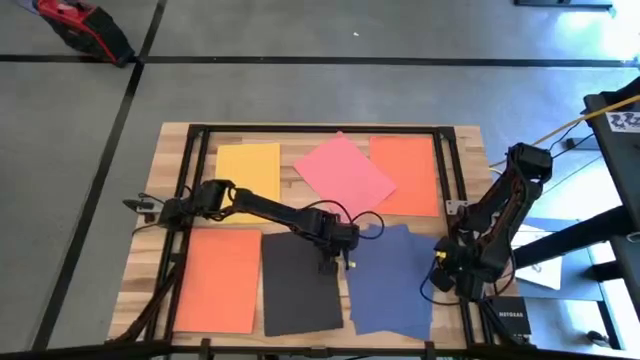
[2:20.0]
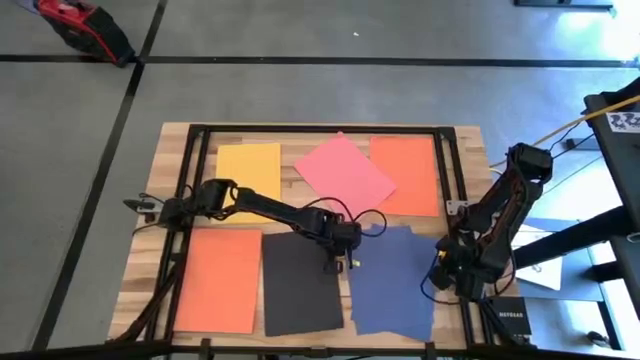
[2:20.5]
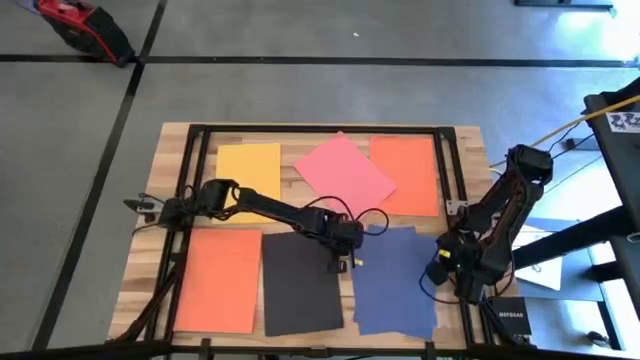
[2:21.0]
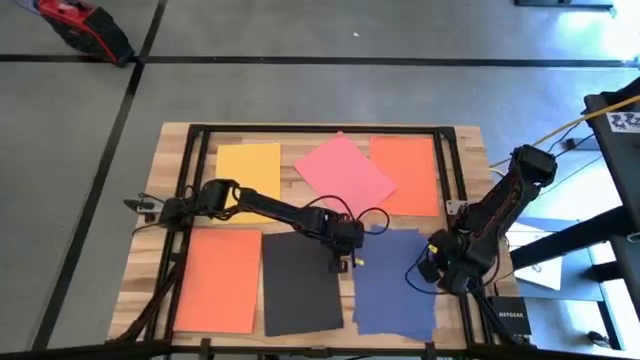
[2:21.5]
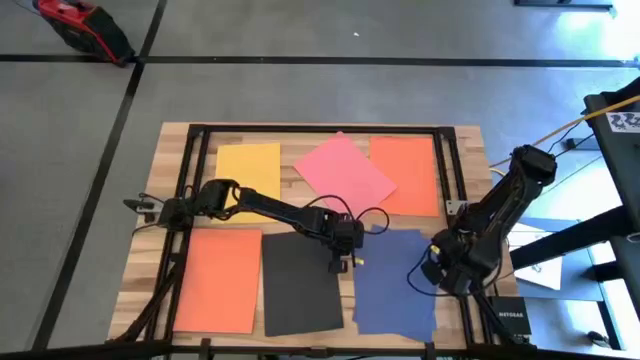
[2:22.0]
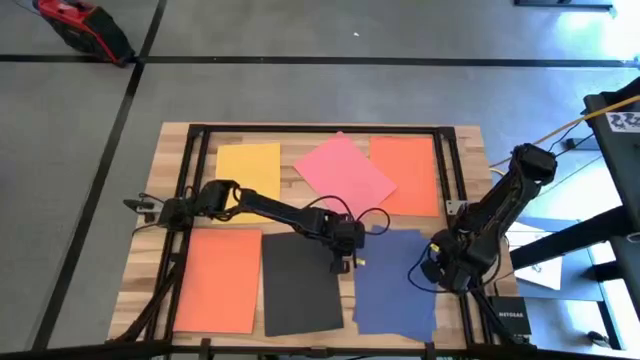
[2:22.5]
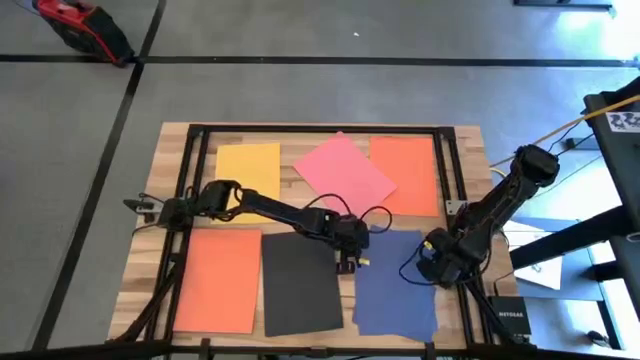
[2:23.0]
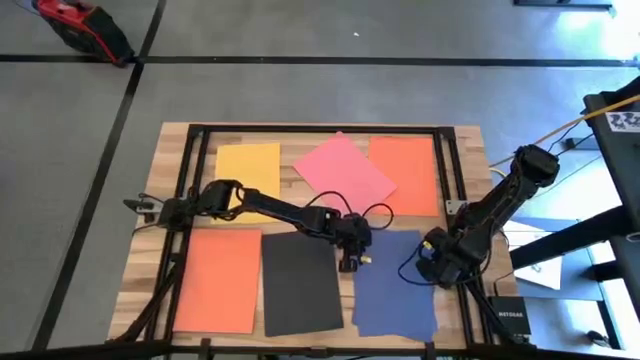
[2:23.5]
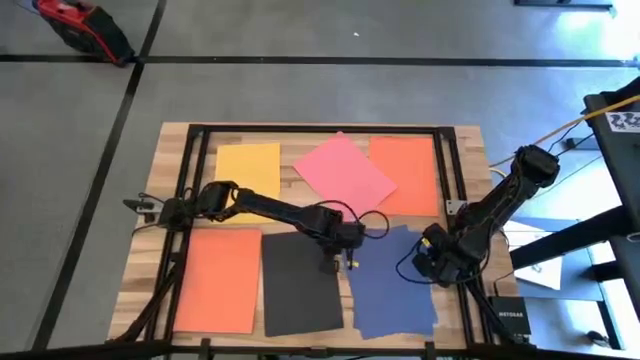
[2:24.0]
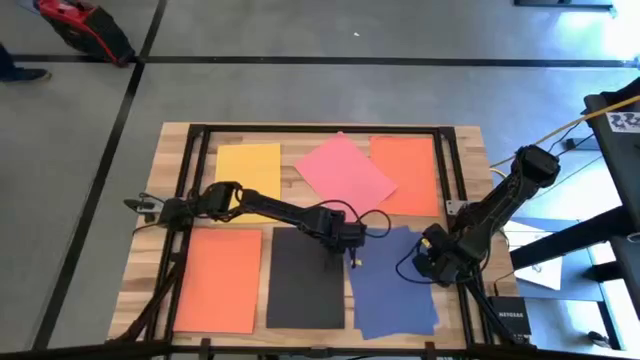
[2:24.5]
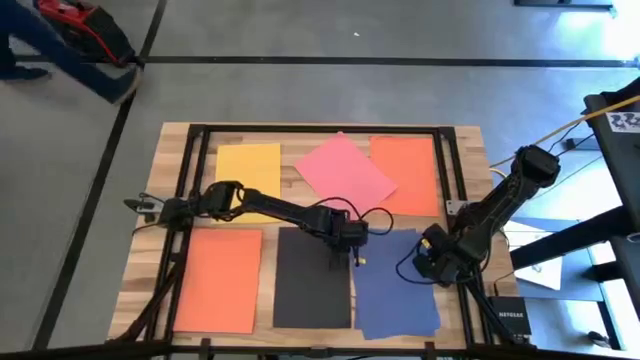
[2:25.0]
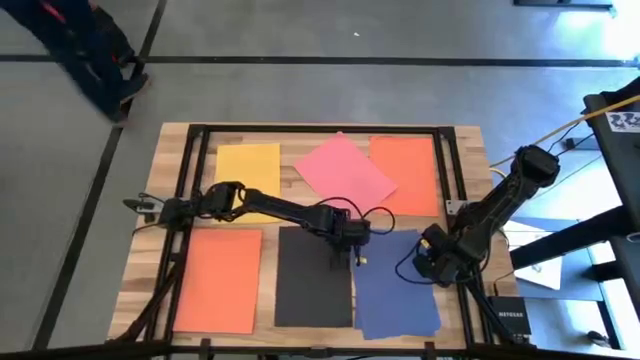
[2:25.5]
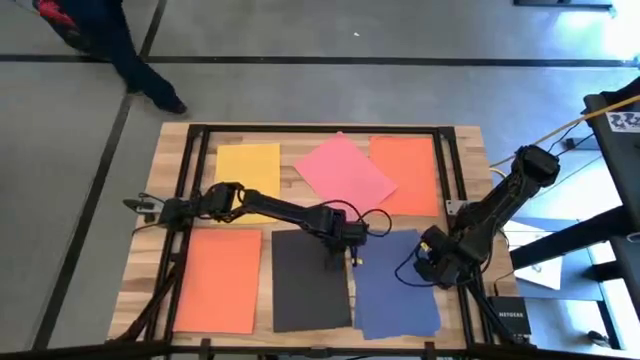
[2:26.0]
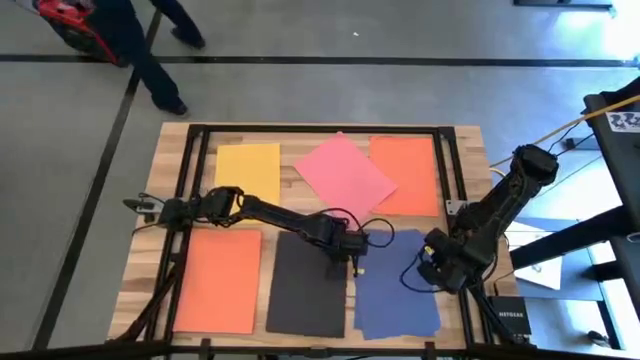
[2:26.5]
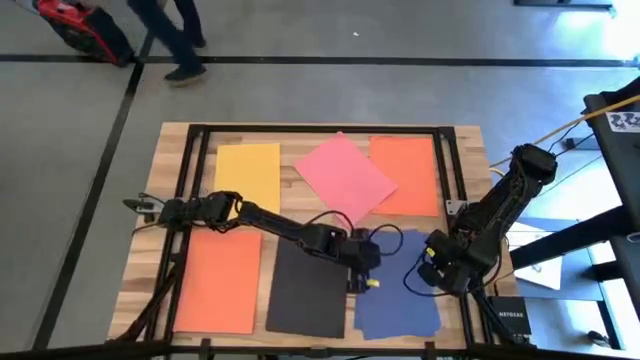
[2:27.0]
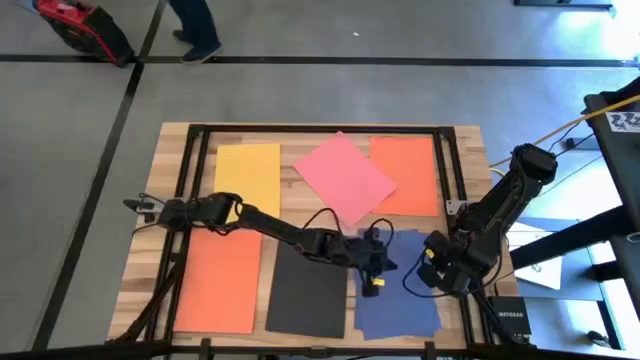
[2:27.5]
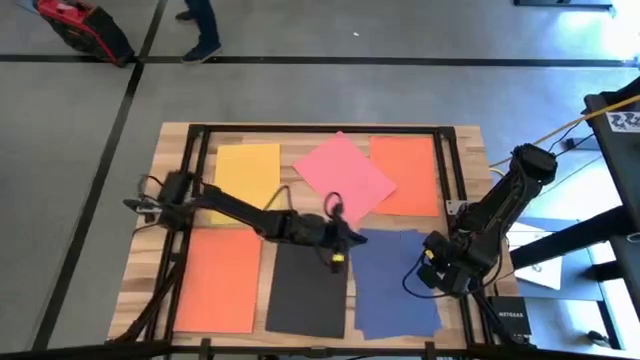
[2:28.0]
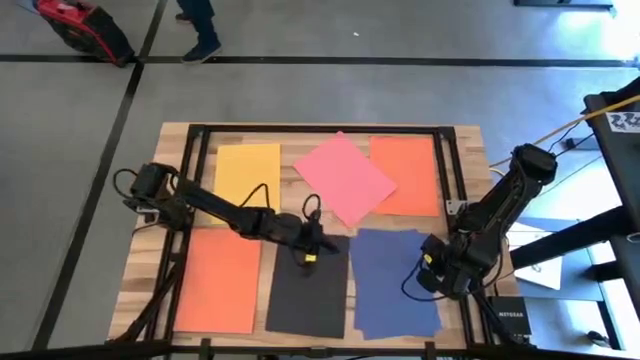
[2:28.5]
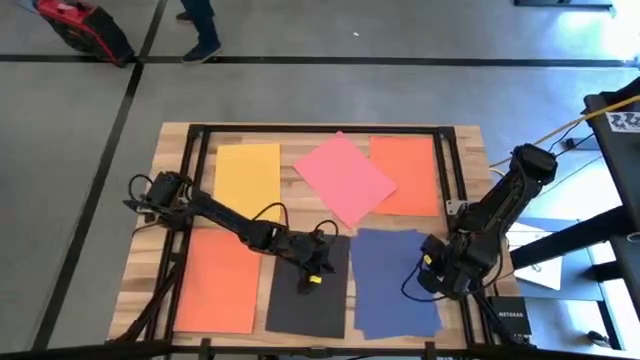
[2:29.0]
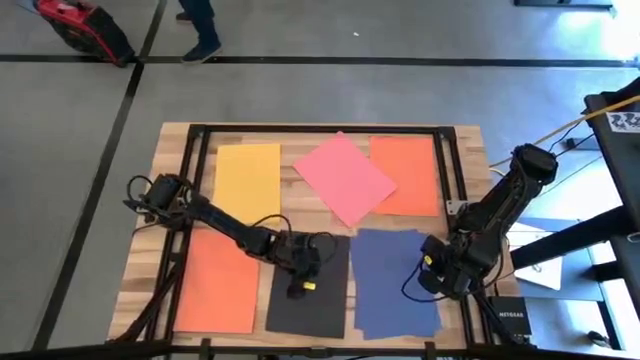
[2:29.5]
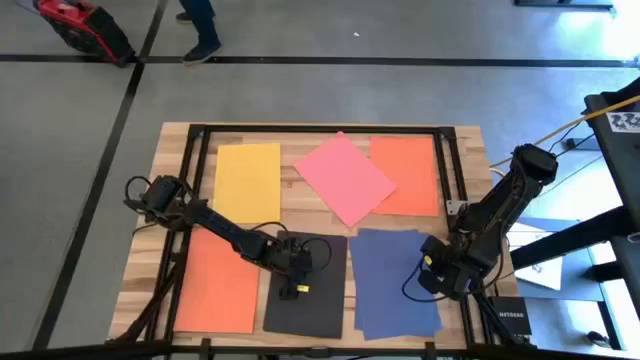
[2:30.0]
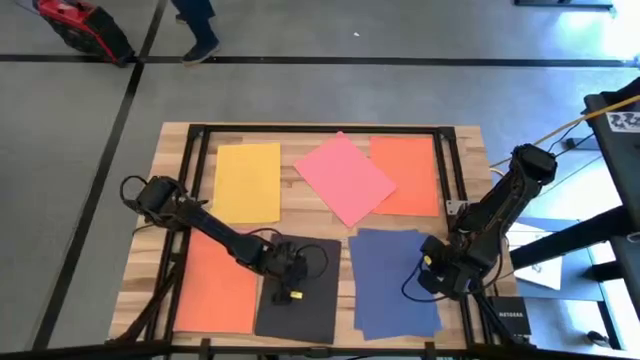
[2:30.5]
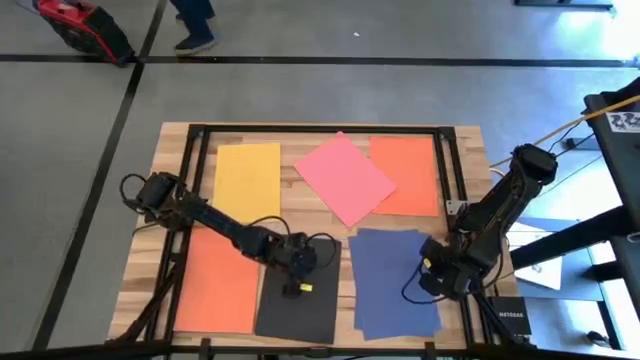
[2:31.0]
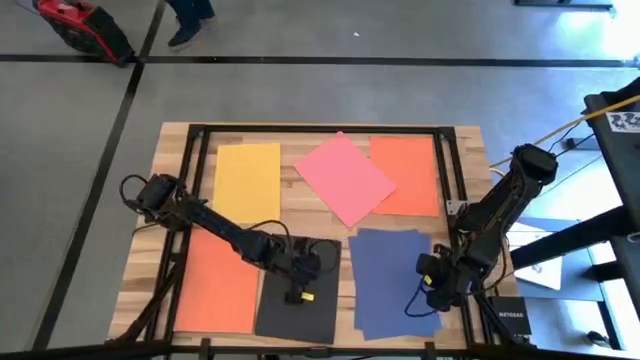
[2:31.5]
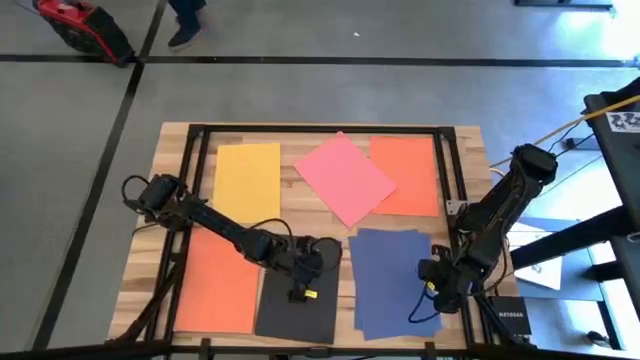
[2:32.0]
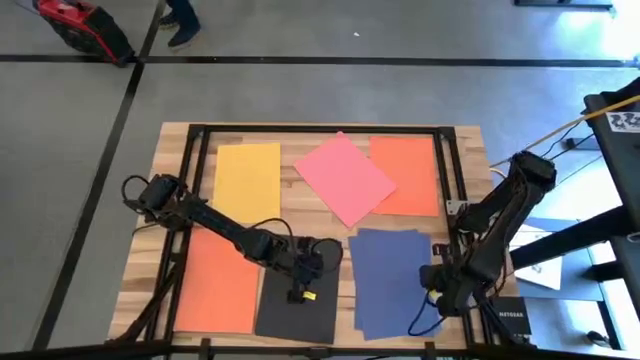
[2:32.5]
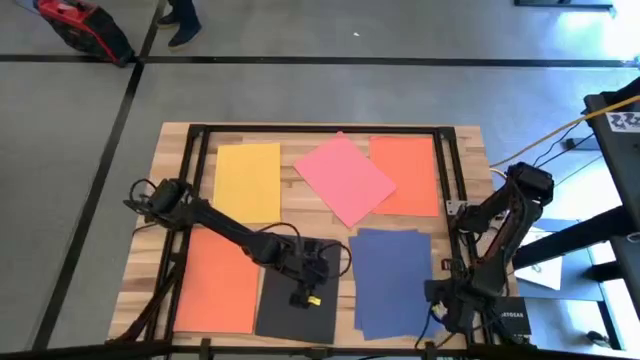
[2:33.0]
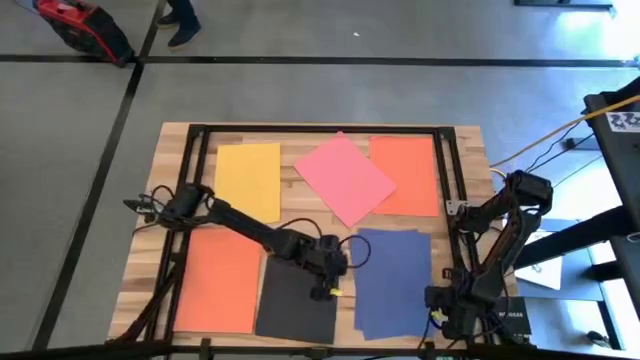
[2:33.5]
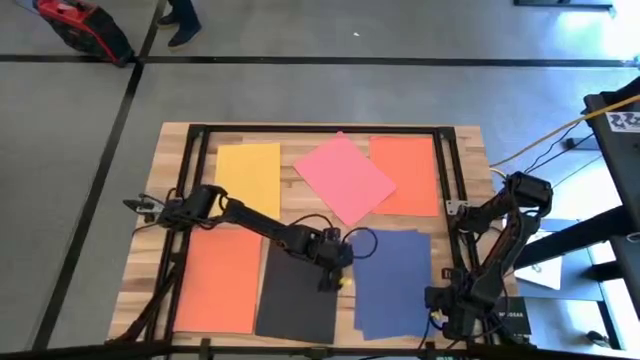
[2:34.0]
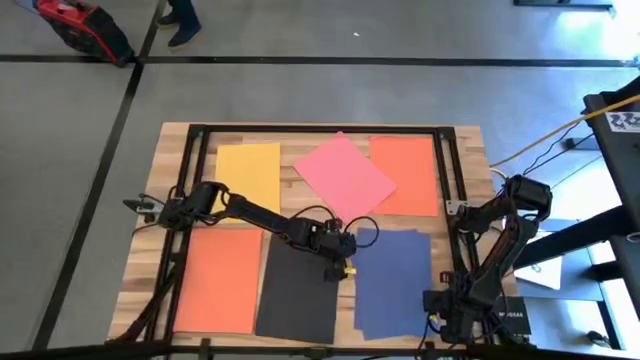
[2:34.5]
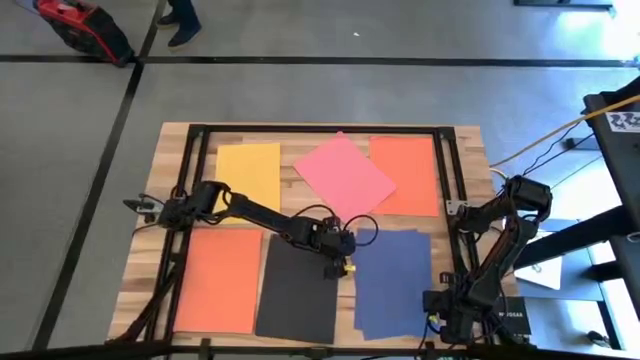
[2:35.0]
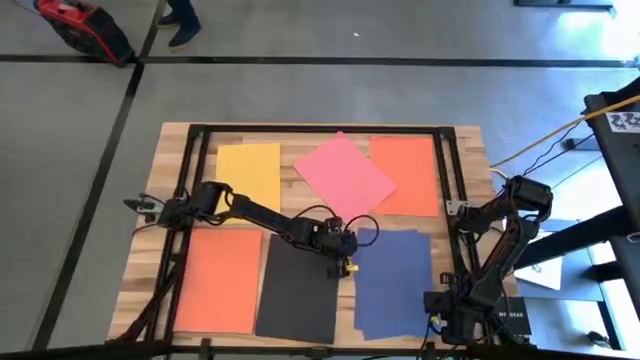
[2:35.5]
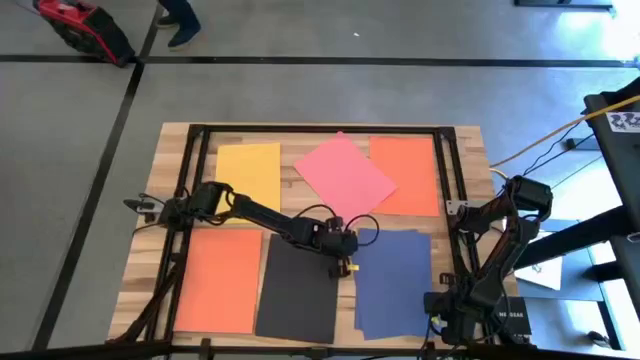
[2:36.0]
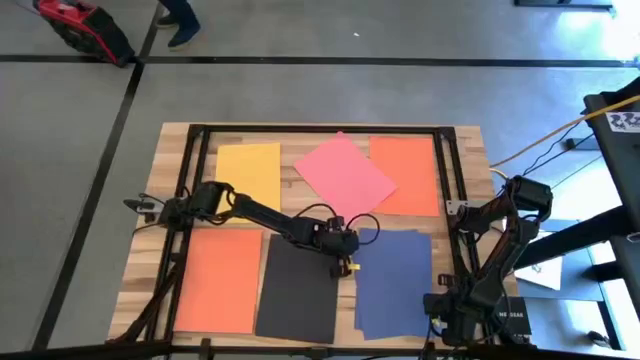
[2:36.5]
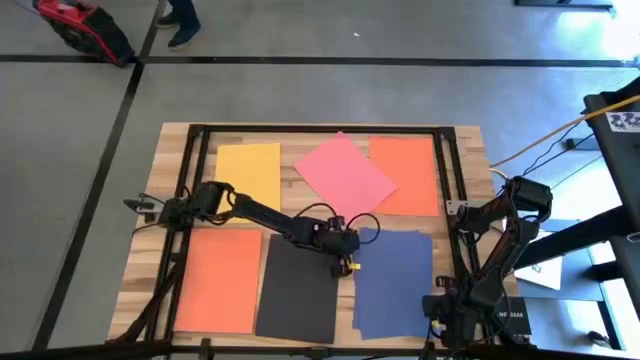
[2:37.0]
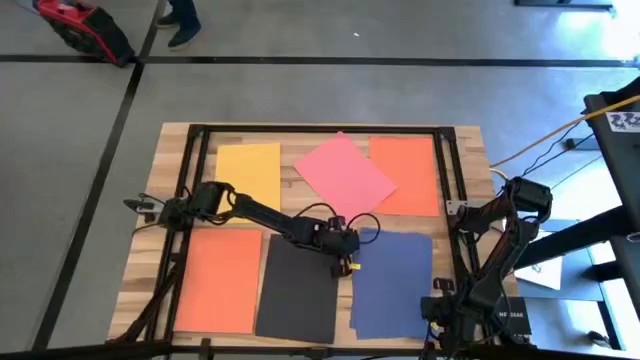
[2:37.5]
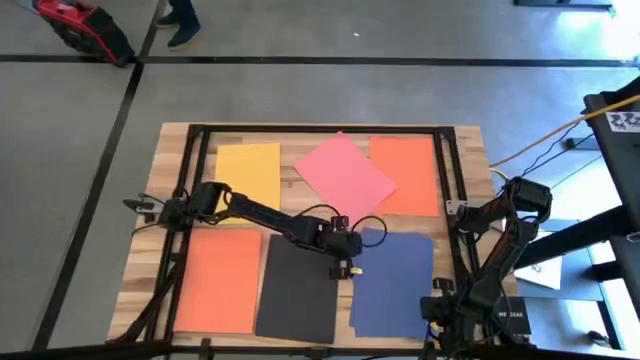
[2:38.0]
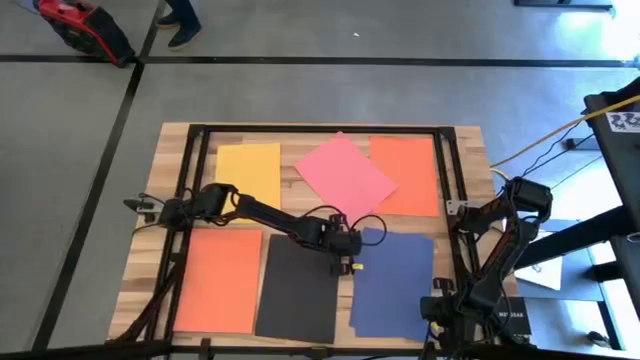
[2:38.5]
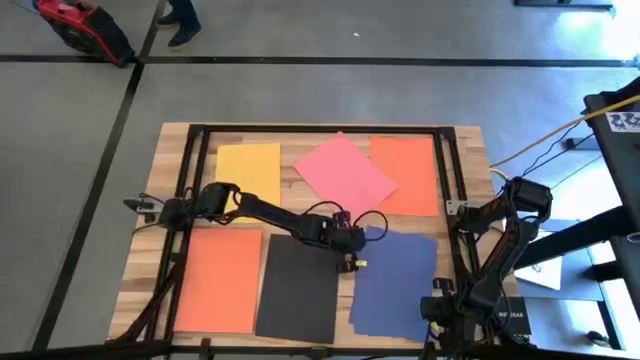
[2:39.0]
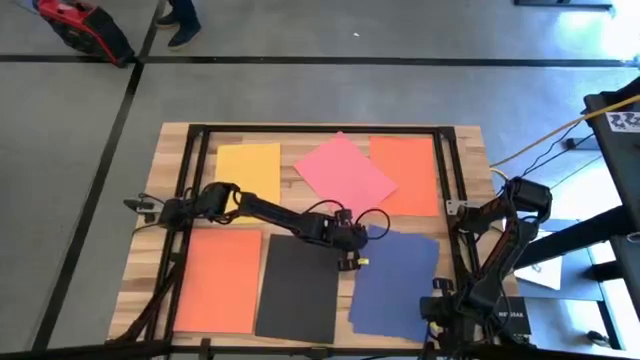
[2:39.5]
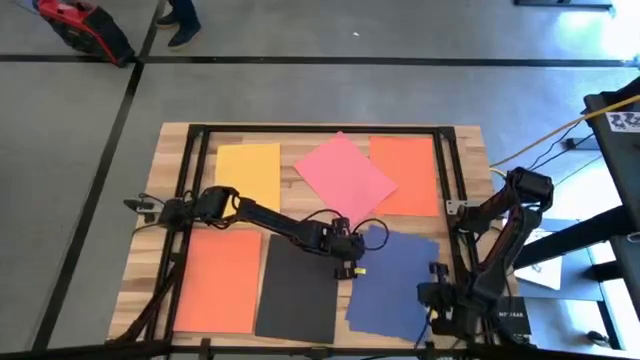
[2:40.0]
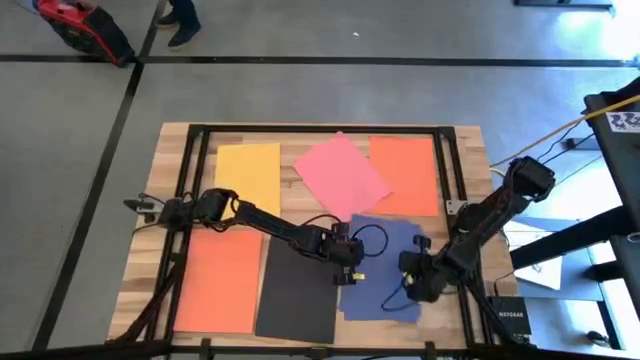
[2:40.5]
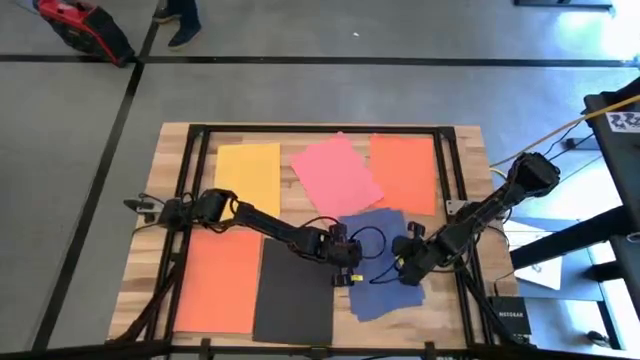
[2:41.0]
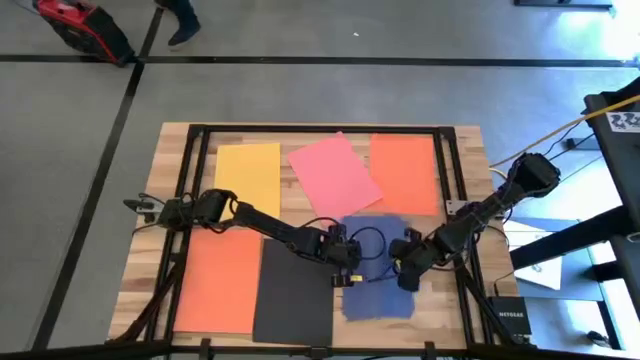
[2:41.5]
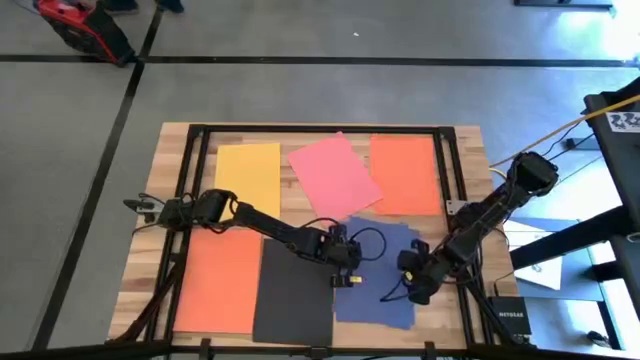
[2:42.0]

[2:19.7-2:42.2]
Task: Organize paper
Stack the blue paper on top of the blue paper on the table
